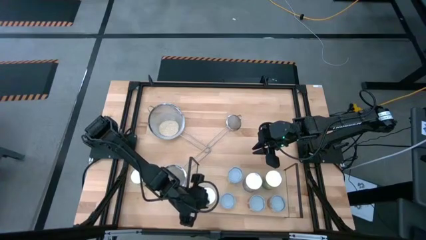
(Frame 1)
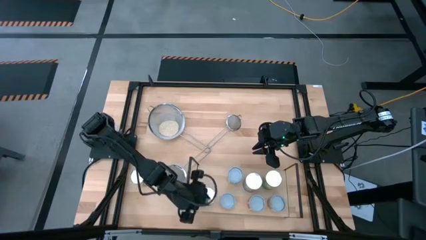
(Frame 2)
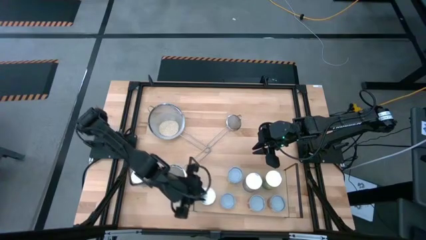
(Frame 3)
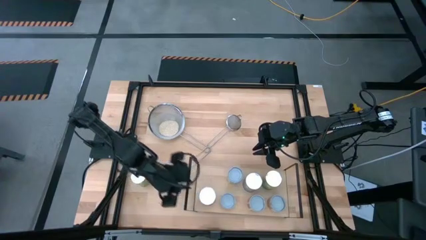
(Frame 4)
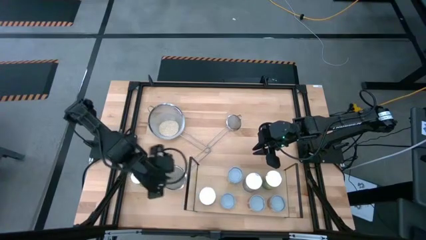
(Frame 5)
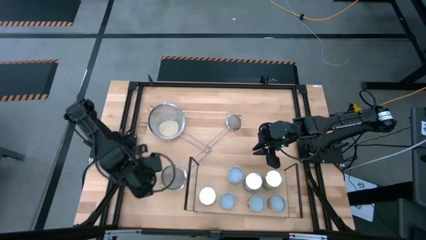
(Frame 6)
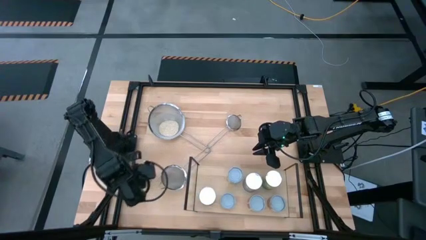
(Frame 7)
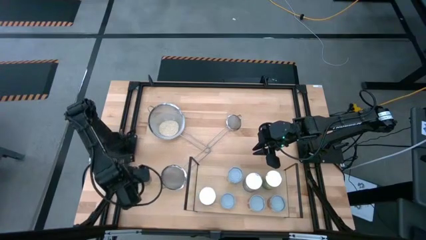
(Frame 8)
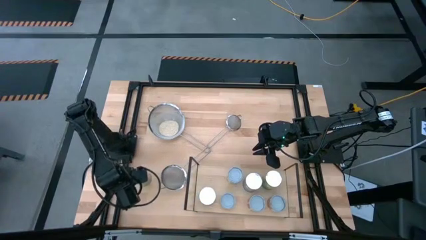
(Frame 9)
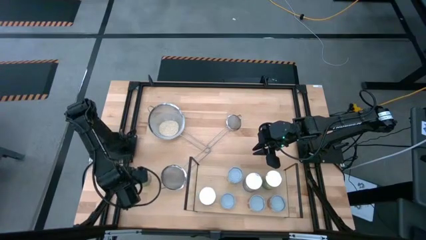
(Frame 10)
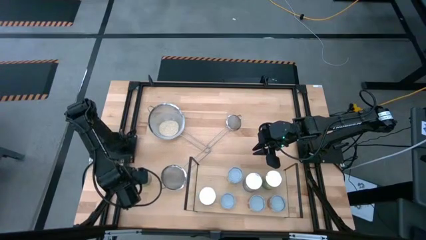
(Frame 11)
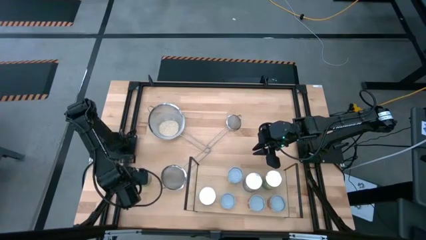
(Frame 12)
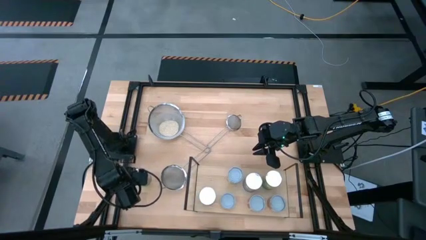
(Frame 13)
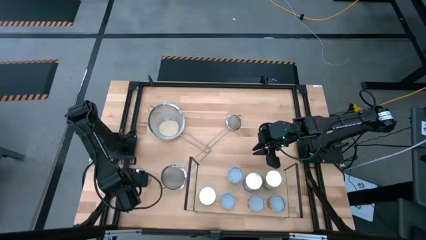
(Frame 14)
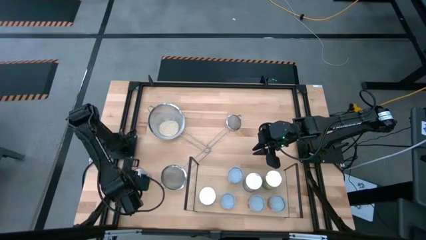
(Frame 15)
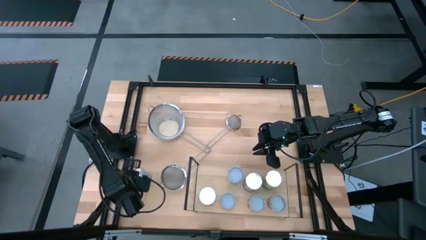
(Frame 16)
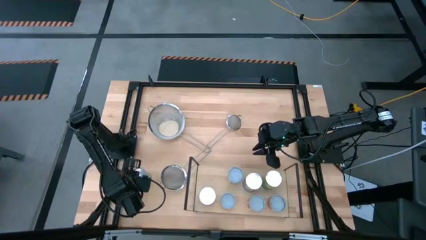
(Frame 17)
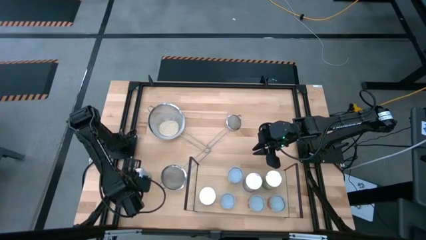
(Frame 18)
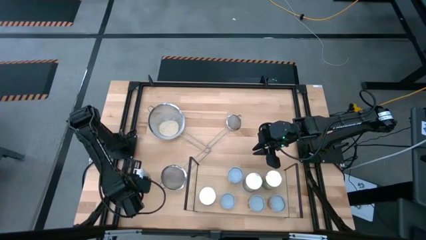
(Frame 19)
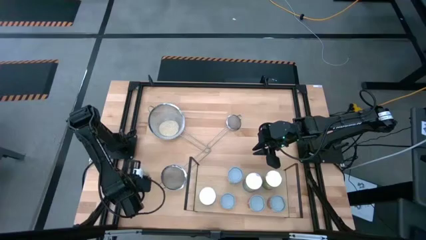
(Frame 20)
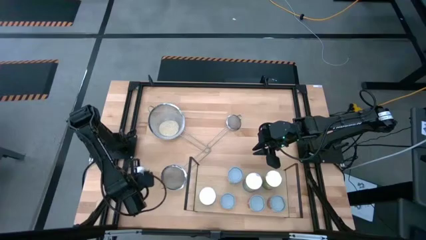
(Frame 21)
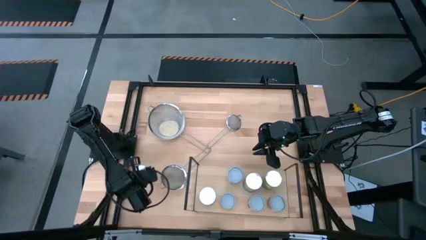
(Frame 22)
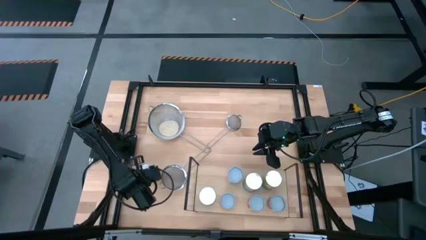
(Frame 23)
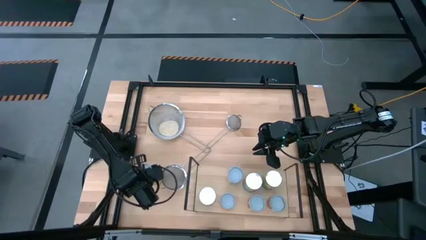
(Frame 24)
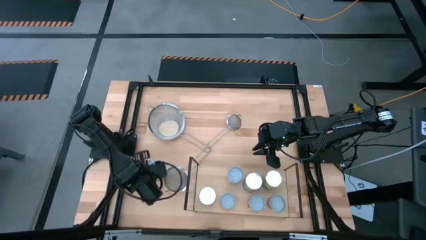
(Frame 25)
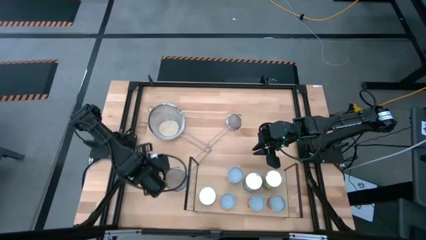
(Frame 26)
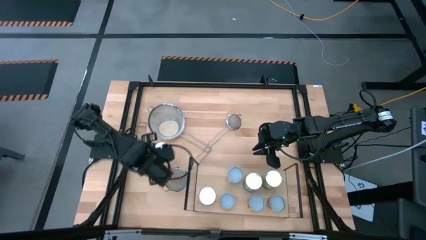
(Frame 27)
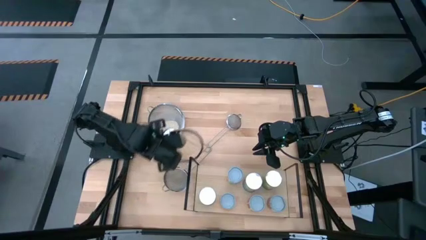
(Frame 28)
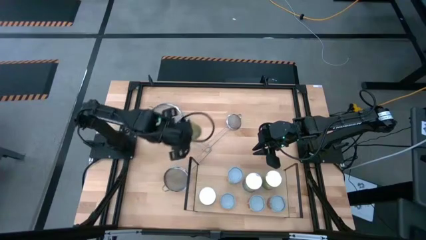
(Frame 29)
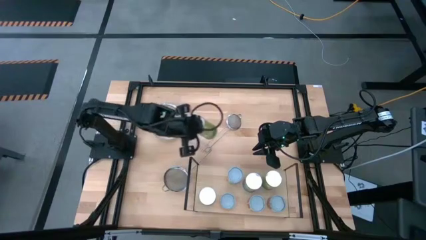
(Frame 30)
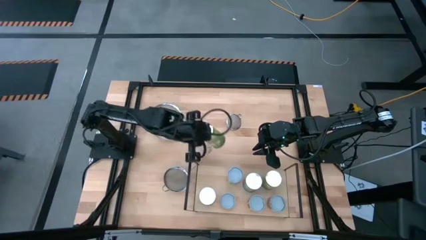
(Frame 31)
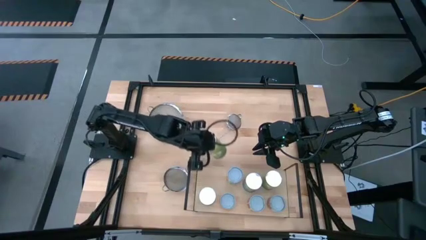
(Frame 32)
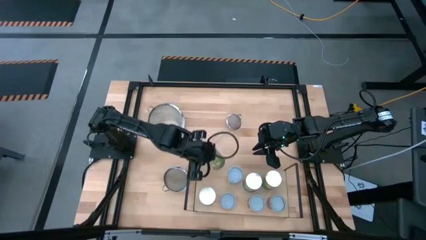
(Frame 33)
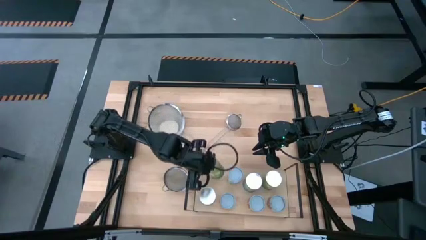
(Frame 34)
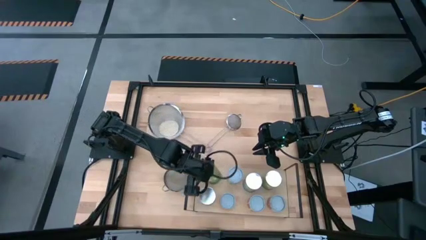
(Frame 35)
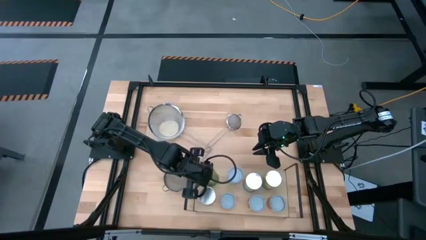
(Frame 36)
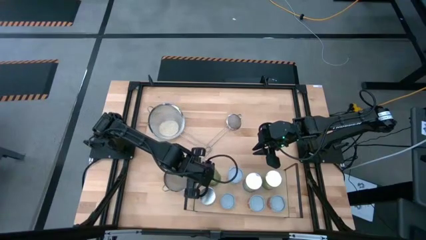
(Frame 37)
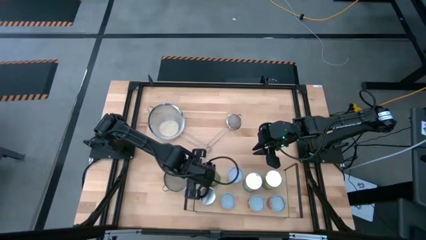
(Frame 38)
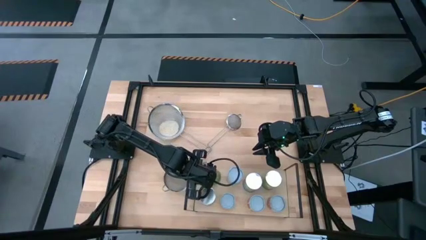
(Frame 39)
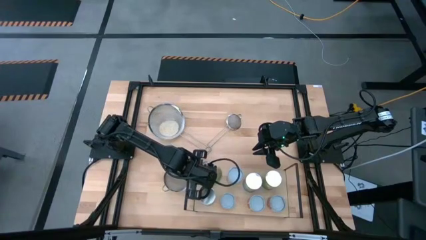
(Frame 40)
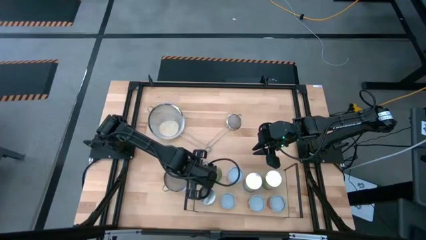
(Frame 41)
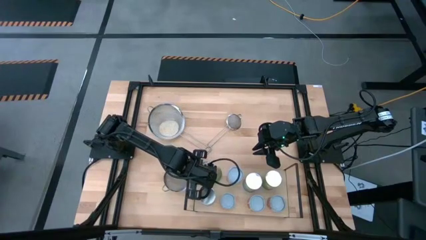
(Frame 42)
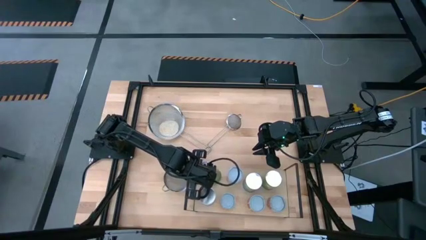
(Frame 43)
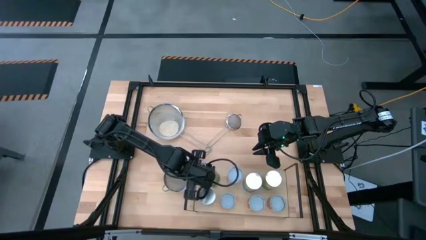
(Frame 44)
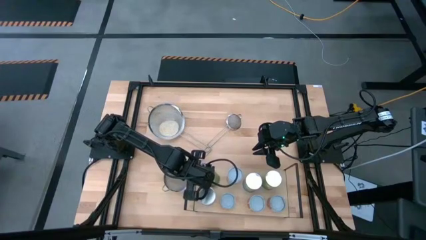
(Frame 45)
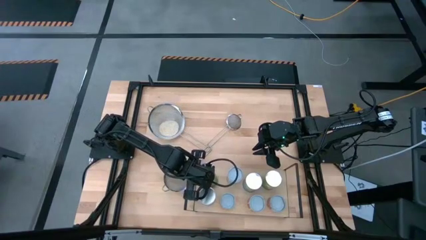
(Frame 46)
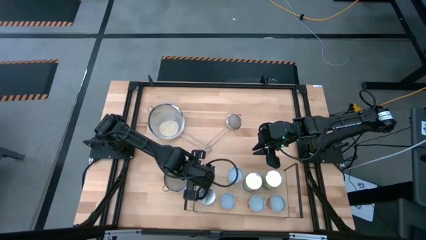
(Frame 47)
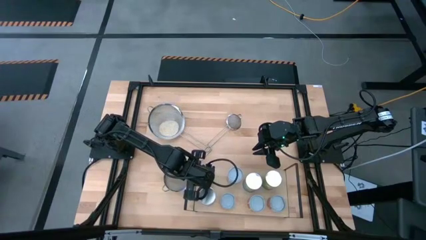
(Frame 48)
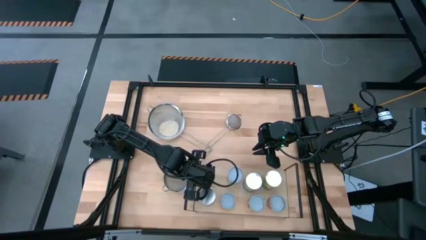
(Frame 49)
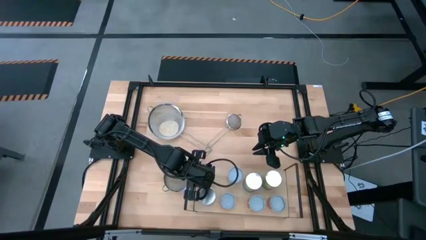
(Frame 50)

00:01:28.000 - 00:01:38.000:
Task: Pick and place cans onto a shelf
Put the canned peaches on the shelf

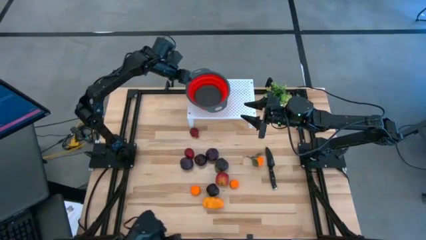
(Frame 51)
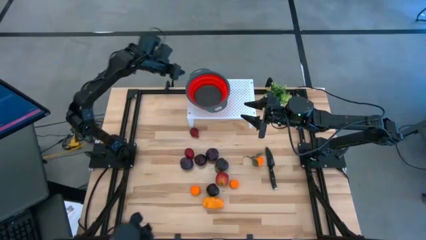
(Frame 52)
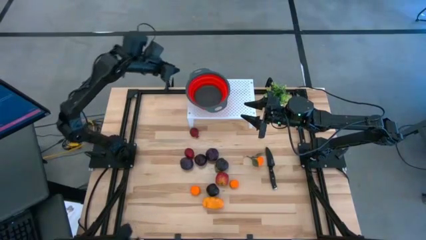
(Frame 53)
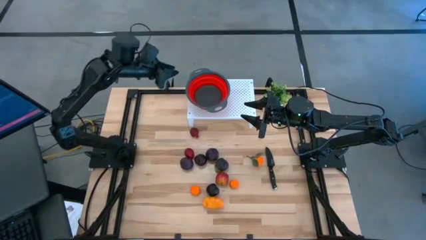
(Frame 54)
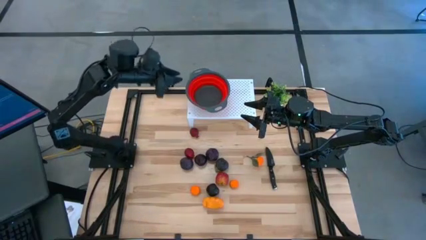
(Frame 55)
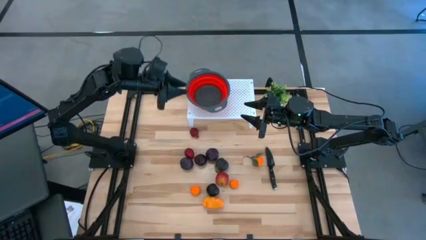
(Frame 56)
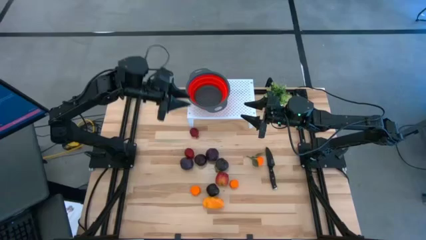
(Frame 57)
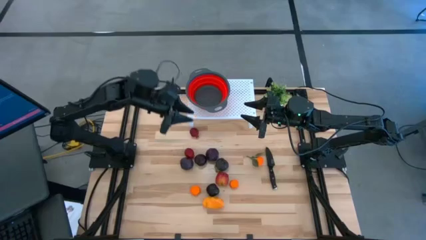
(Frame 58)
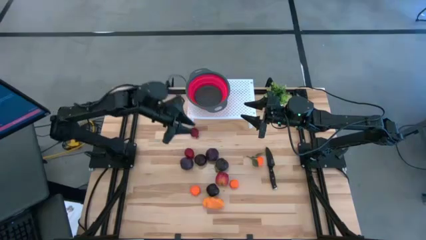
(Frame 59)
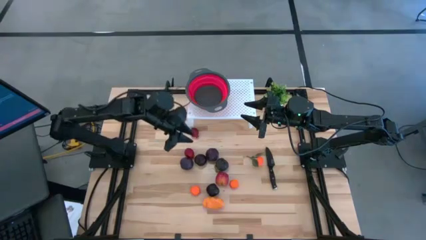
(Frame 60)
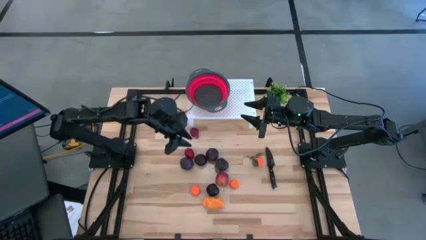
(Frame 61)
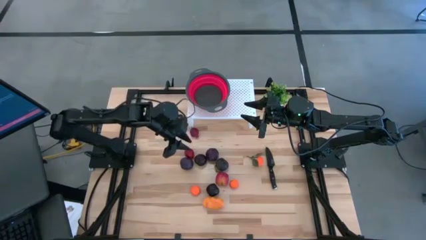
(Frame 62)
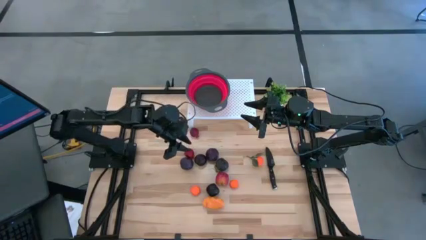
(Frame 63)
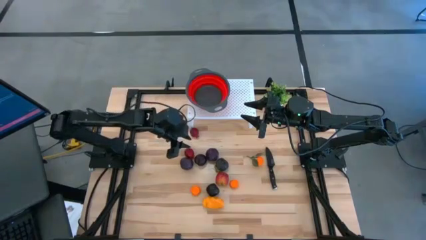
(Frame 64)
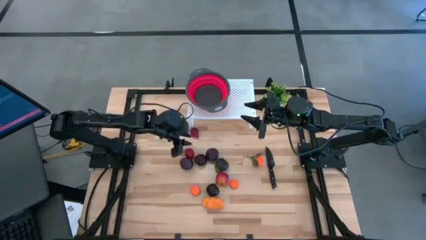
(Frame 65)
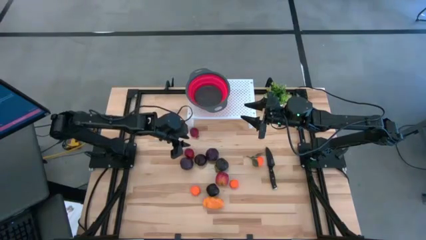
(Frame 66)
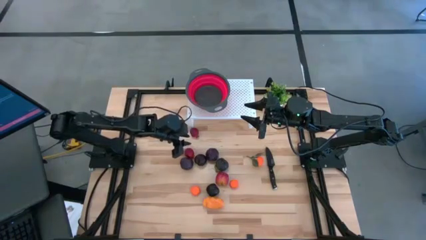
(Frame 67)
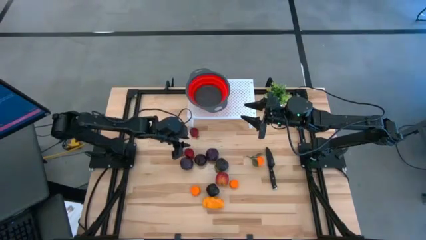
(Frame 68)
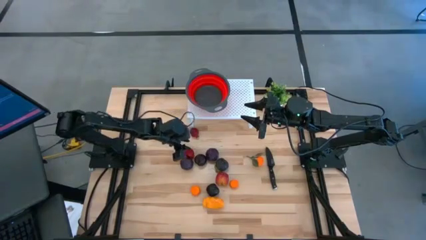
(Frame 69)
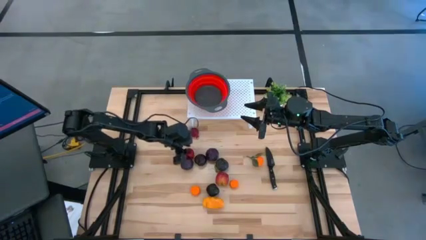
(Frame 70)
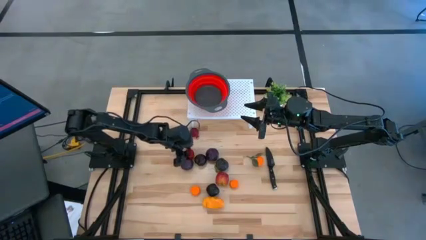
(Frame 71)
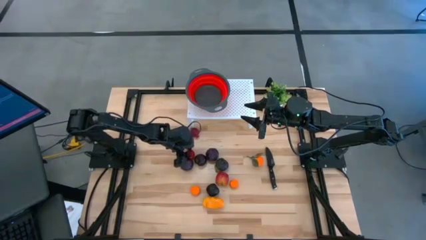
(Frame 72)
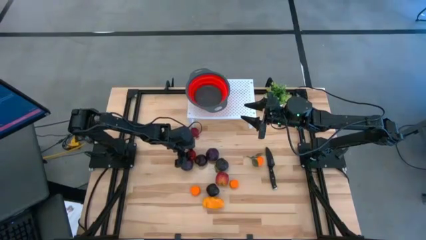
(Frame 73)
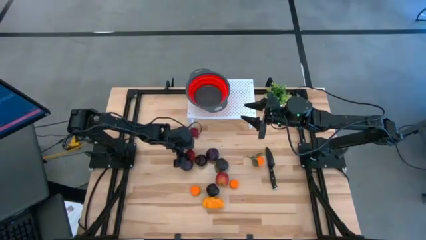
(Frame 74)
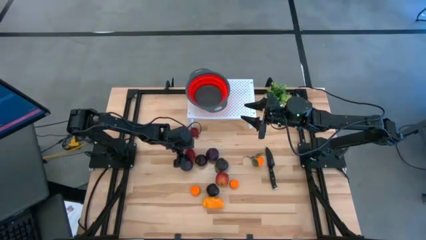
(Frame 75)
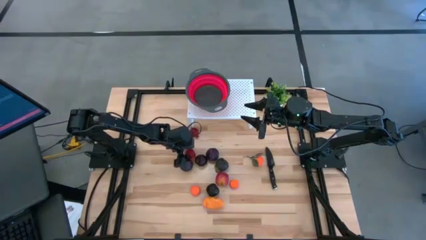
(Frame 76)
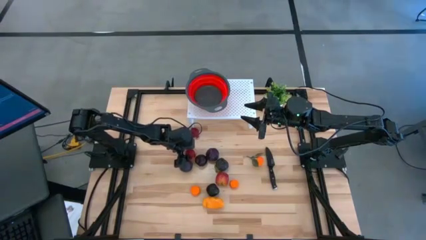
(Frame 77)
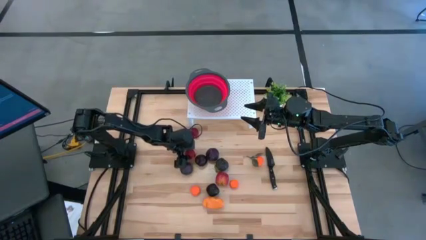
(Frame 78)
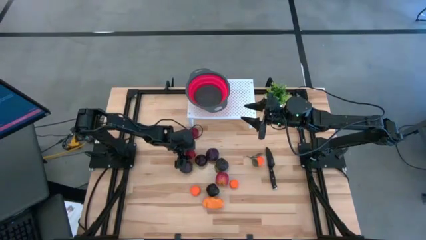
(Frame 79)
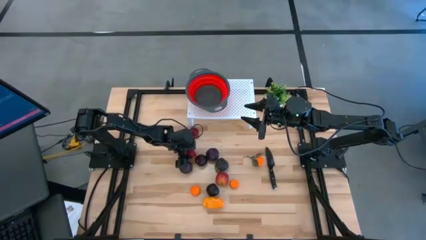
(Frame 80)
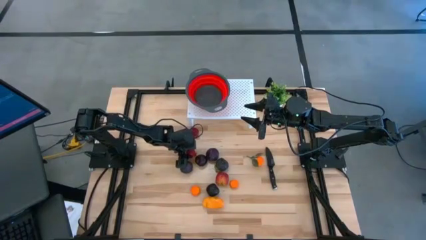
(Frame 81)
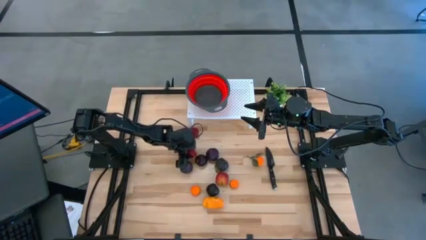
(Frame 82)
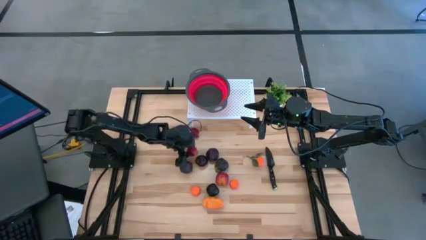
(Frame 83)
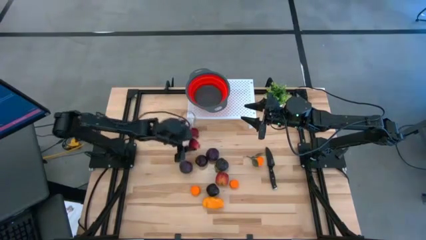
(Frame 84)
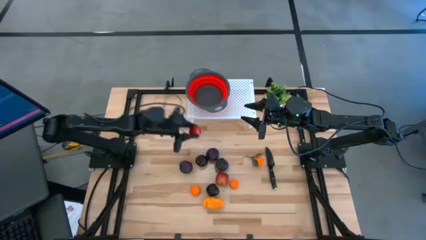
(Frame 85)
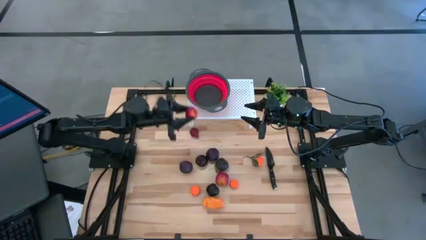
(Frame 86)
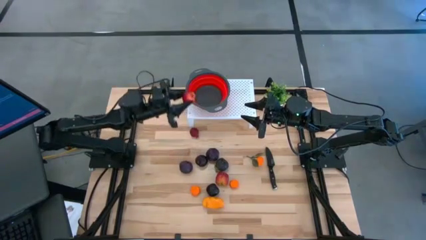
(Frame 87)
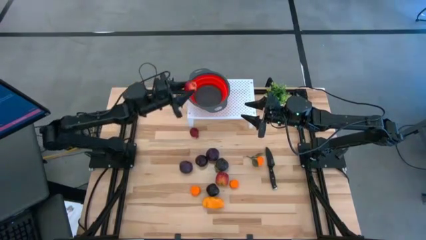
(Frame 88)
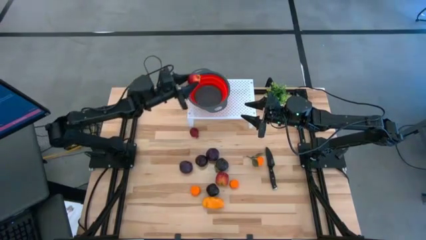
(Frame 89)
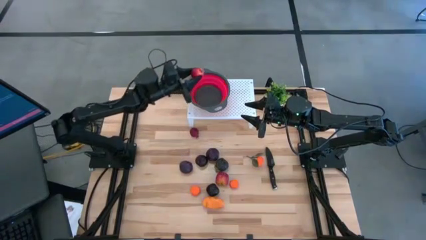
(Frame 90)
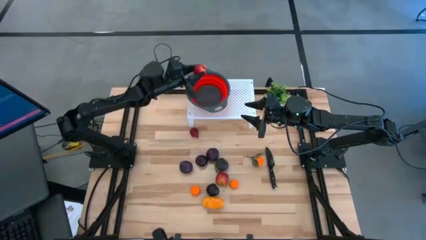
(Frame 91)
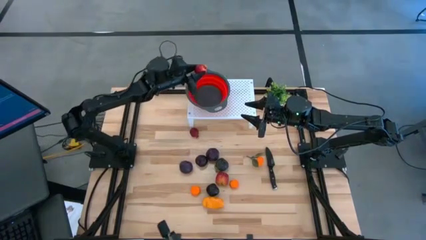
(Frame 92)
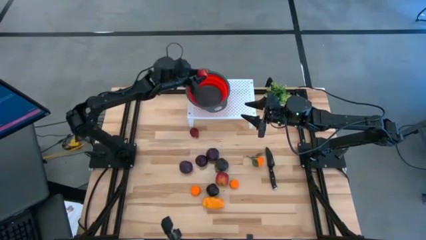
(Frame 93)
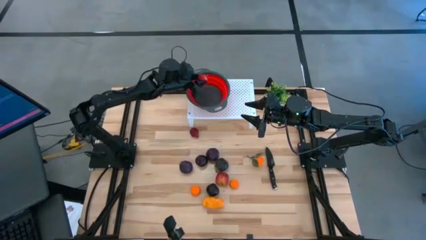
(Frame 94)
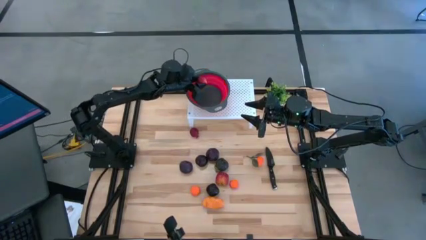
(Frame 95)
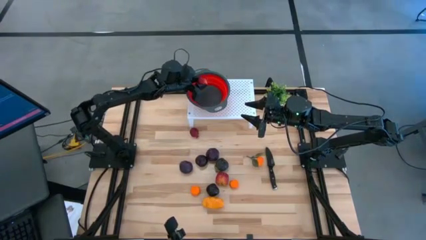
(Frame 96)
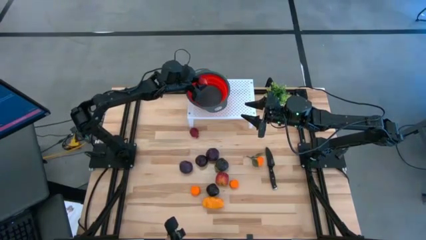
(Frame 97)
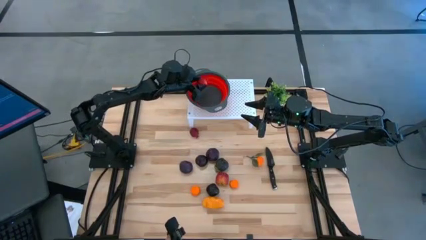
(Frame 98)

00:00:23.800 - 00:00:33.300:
Task: Pick & Place Fruit
Put the bottom pomegranate into the strainer bowl on the shelf
